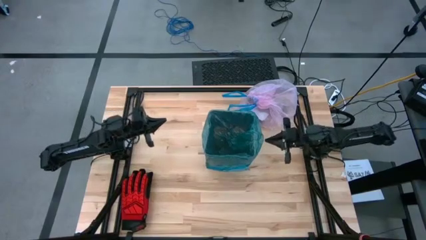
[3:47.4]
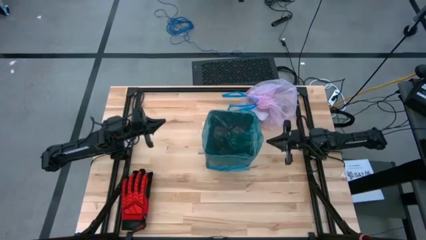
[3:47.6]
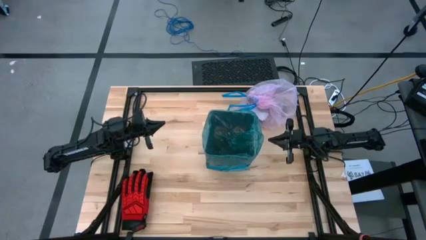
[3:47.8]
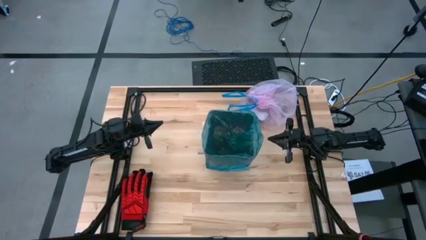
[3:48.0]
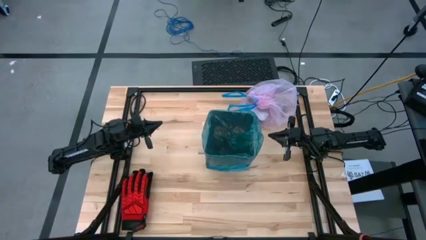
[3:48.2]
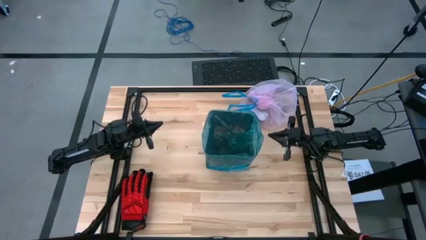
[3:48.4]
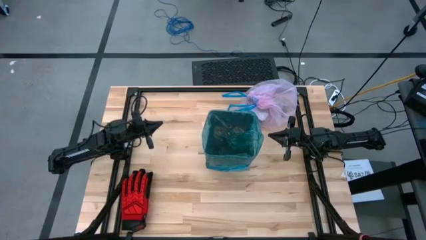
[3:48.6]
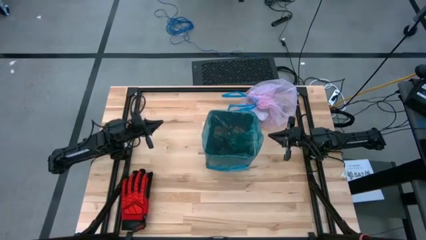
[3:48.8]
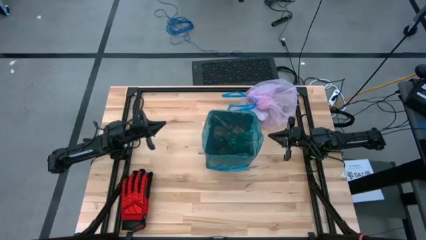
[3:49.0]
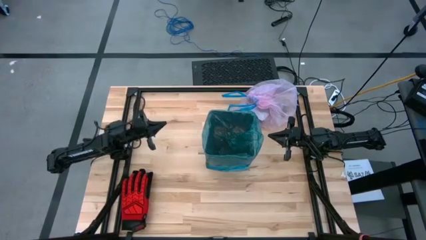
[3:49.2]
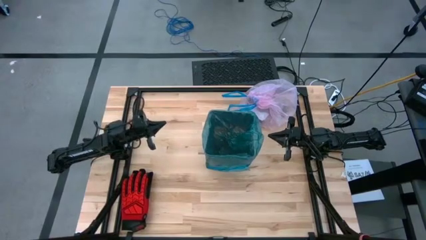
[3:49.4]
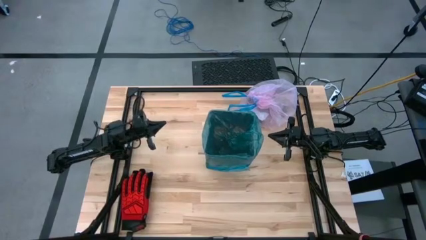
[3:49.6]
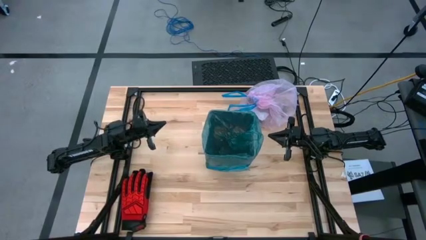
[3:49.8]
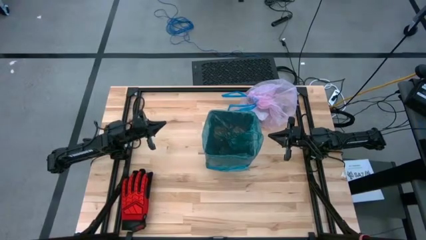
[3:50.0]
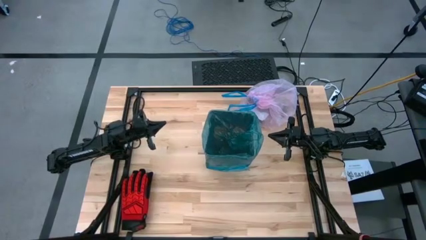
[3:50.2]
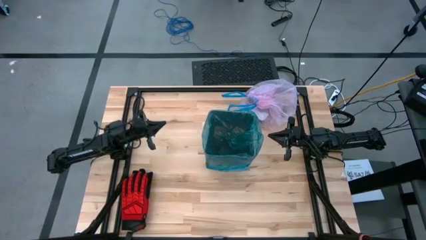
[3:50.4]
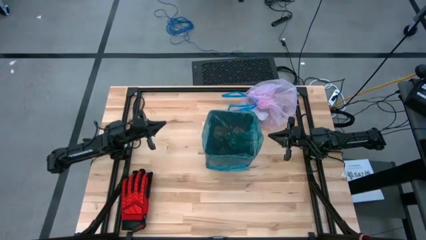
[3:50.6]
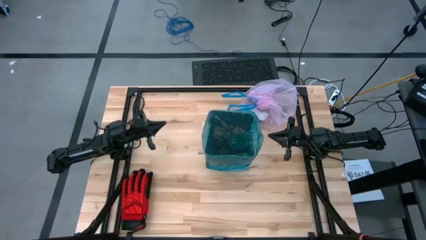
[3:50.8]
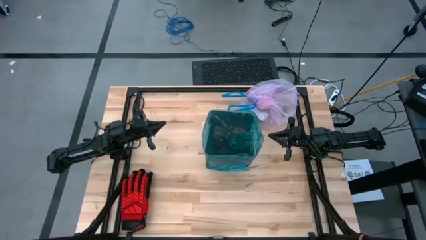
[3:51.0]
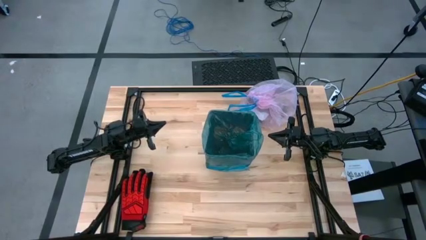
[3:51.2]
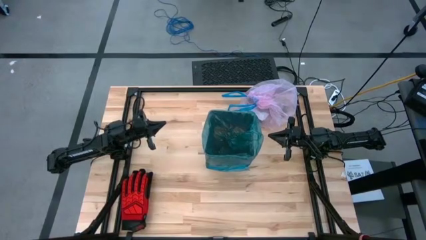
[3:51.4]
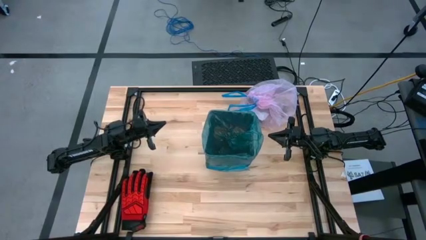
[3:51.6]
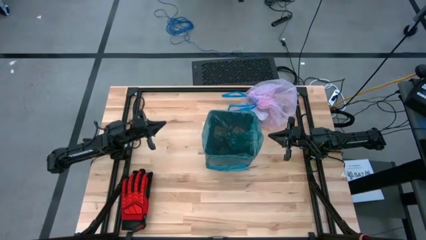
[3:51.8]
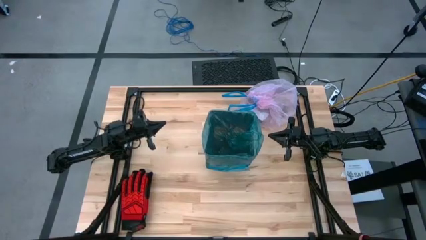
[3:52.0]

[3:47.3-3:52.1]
Task: place trash/remove bag and relplace
Return to Home Position

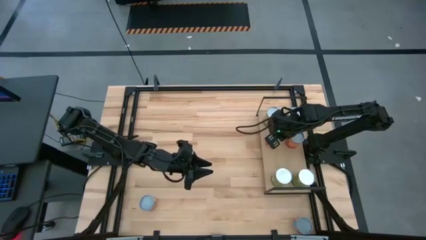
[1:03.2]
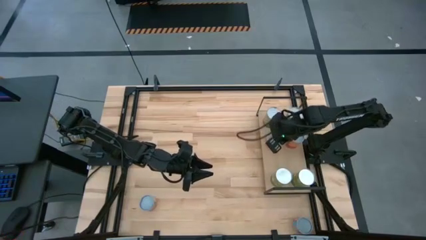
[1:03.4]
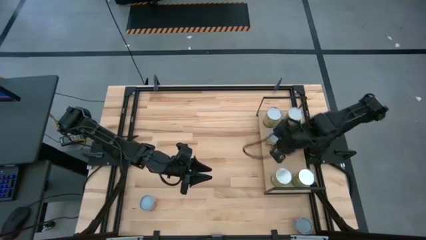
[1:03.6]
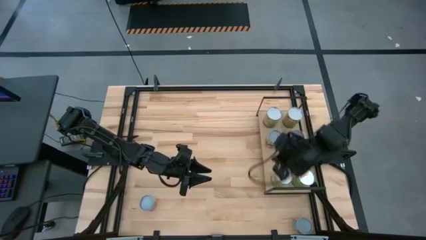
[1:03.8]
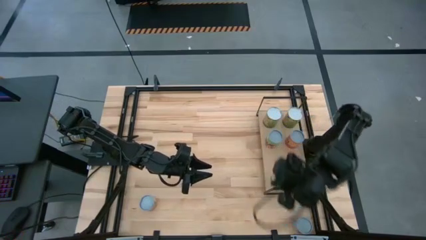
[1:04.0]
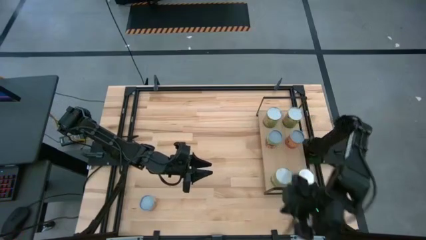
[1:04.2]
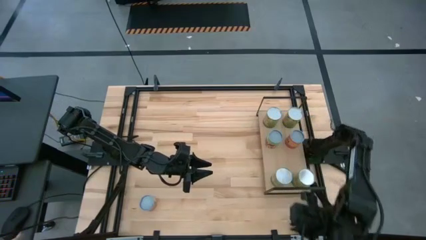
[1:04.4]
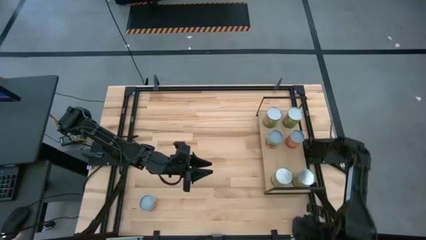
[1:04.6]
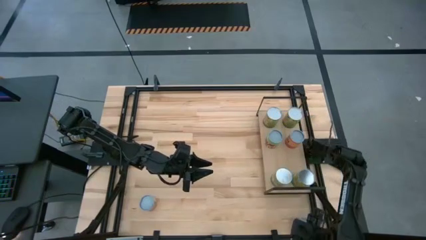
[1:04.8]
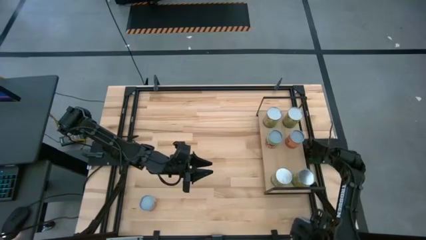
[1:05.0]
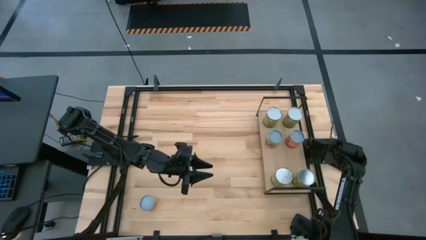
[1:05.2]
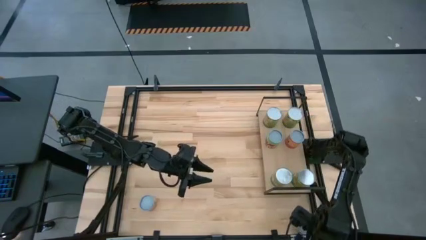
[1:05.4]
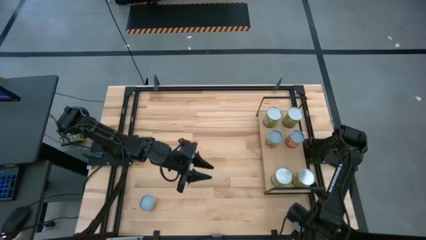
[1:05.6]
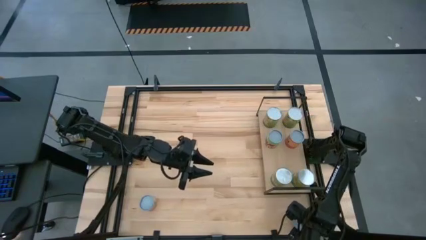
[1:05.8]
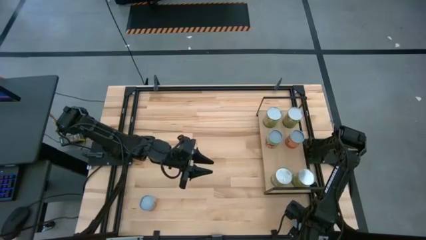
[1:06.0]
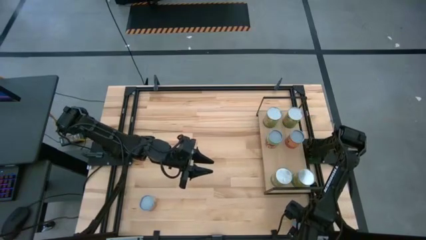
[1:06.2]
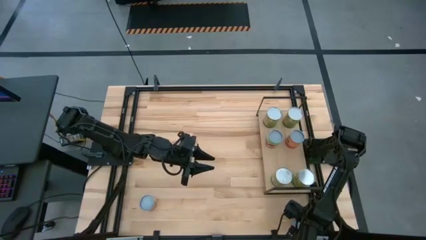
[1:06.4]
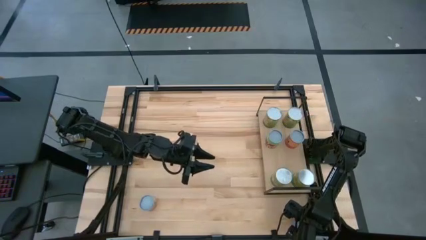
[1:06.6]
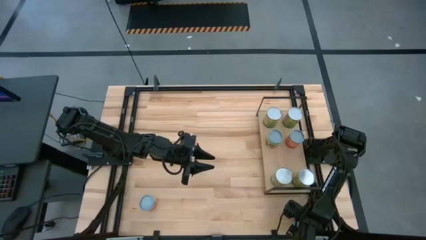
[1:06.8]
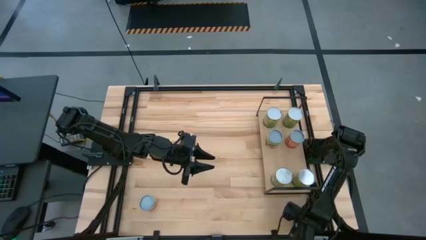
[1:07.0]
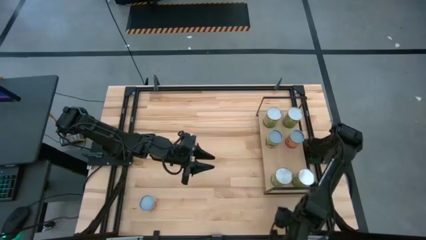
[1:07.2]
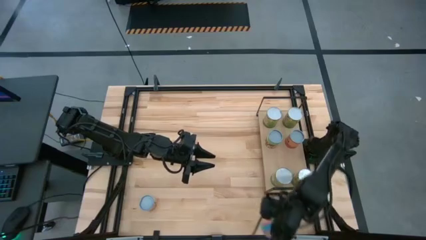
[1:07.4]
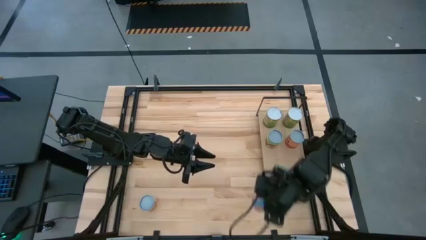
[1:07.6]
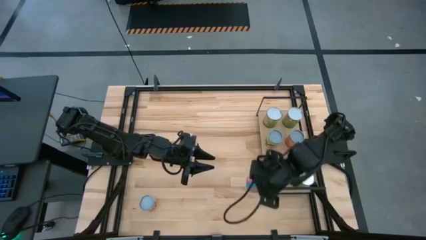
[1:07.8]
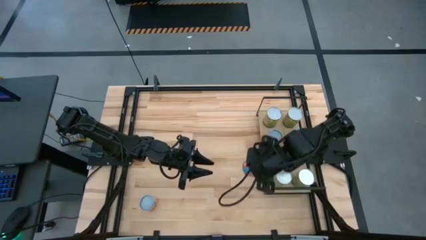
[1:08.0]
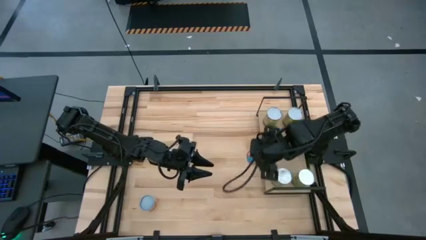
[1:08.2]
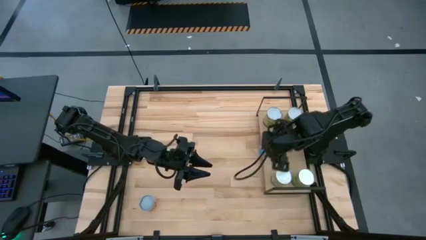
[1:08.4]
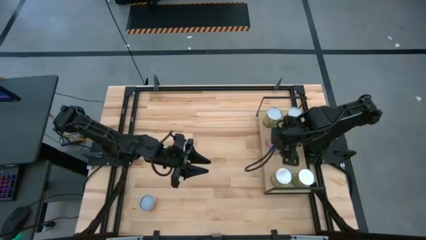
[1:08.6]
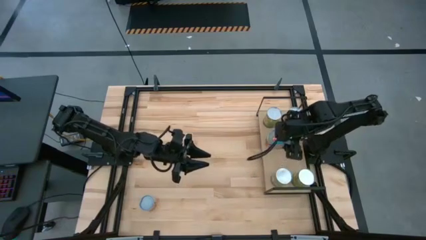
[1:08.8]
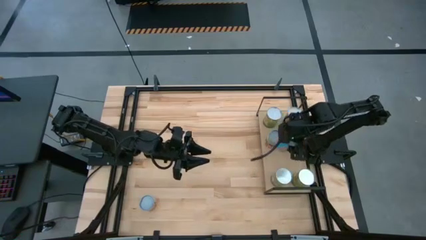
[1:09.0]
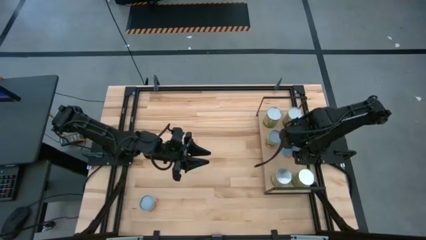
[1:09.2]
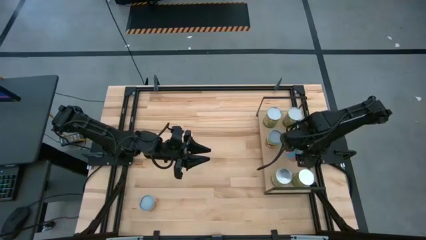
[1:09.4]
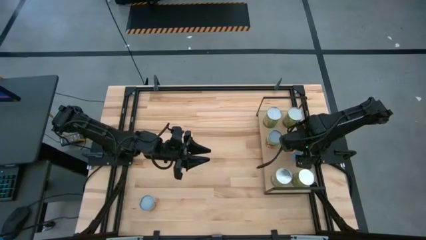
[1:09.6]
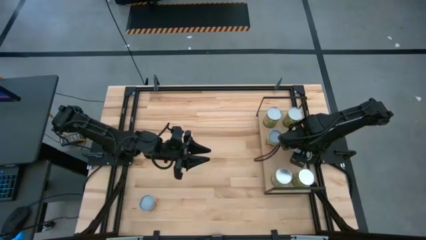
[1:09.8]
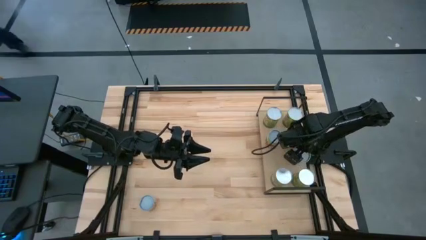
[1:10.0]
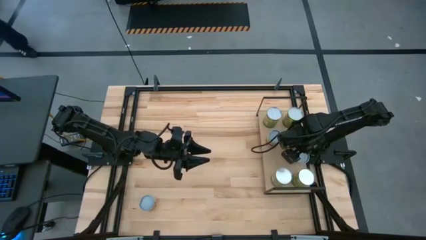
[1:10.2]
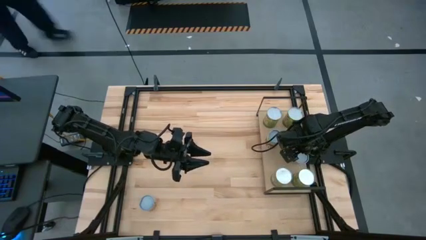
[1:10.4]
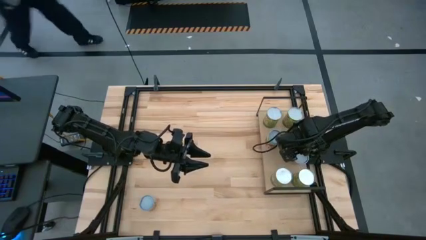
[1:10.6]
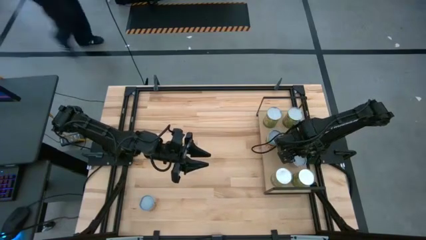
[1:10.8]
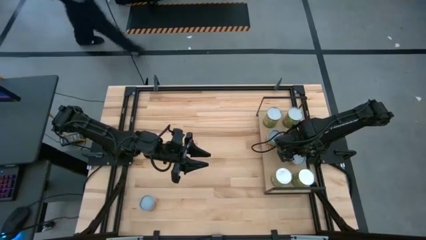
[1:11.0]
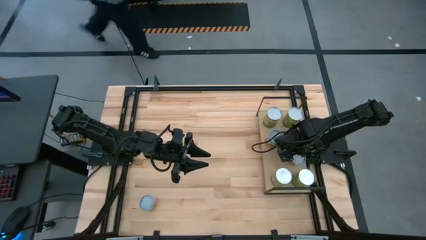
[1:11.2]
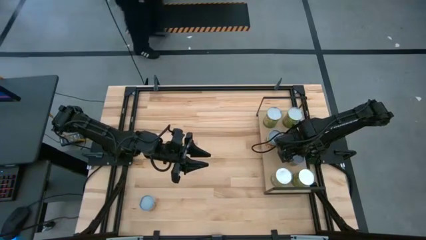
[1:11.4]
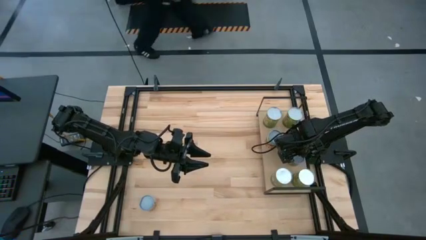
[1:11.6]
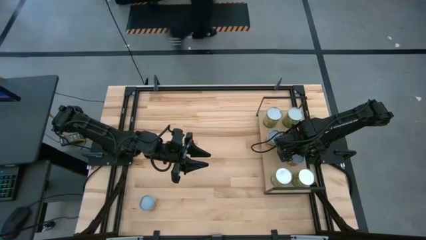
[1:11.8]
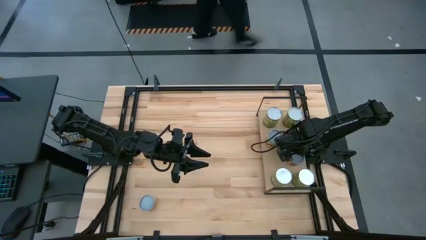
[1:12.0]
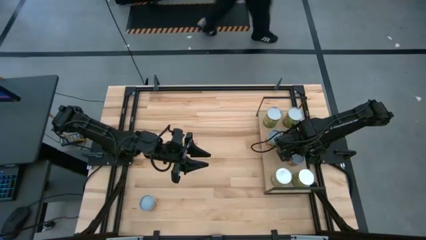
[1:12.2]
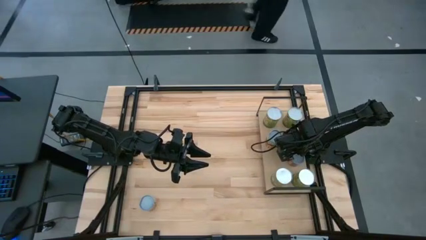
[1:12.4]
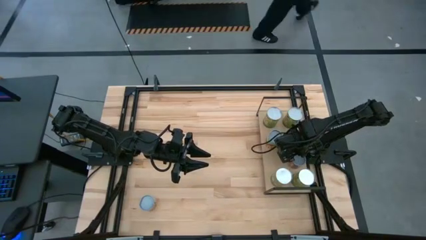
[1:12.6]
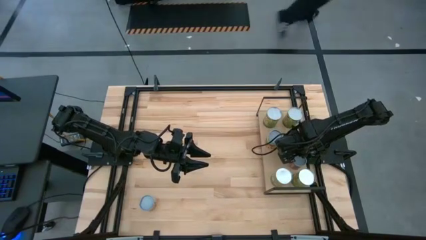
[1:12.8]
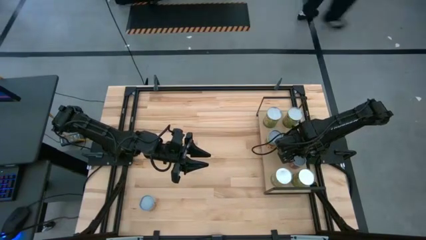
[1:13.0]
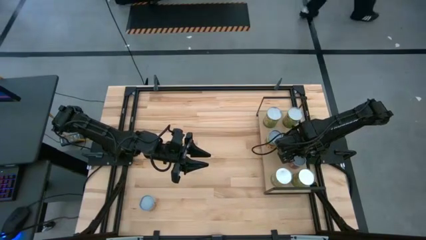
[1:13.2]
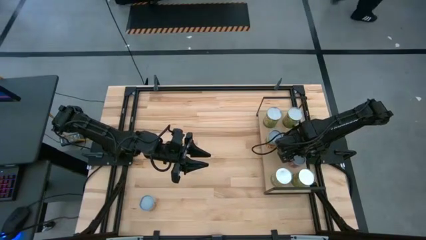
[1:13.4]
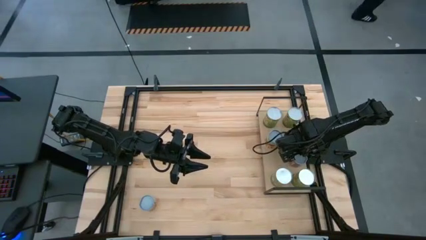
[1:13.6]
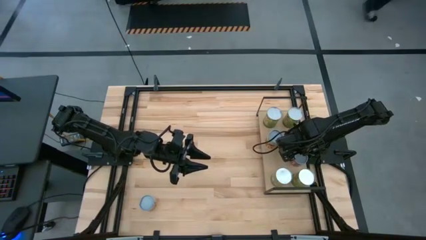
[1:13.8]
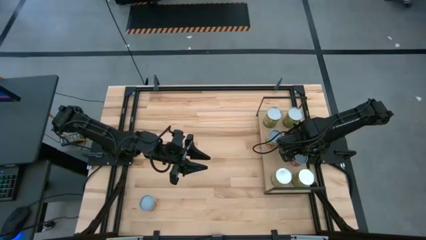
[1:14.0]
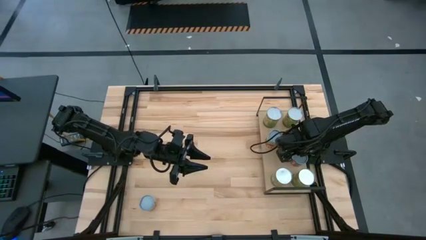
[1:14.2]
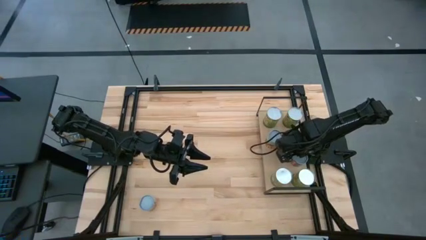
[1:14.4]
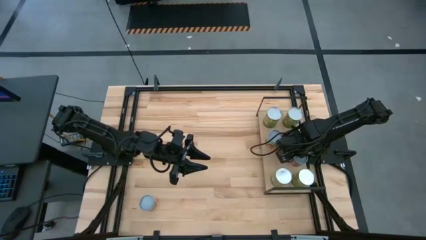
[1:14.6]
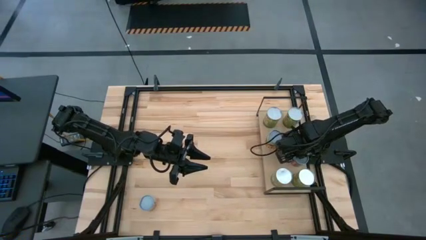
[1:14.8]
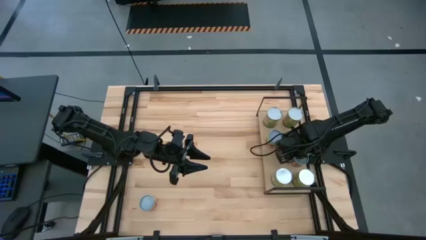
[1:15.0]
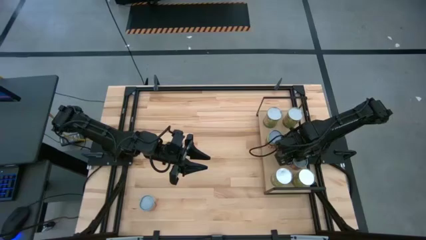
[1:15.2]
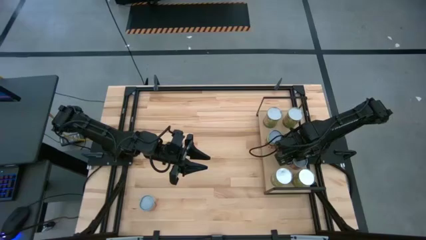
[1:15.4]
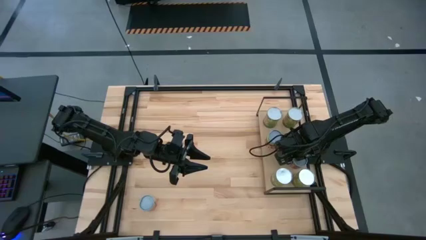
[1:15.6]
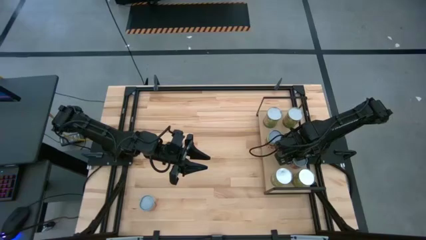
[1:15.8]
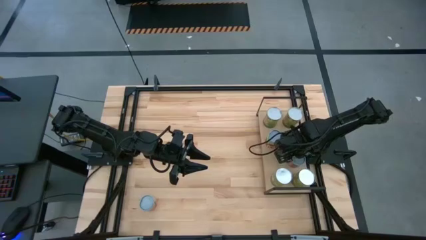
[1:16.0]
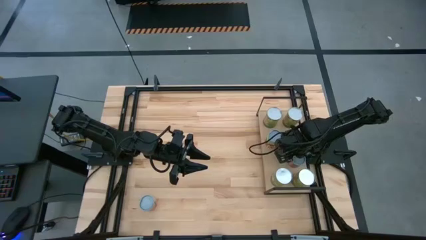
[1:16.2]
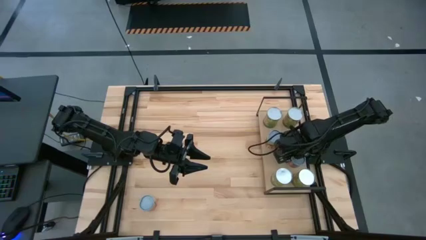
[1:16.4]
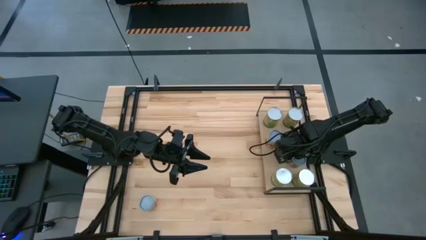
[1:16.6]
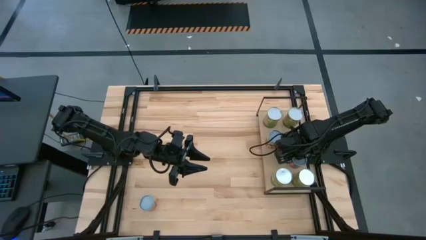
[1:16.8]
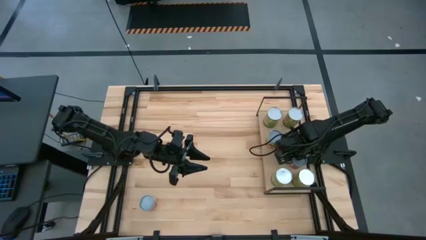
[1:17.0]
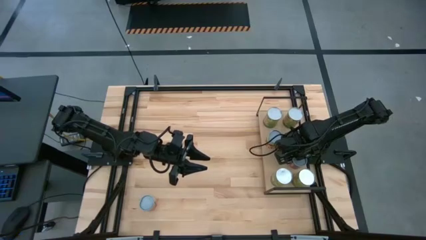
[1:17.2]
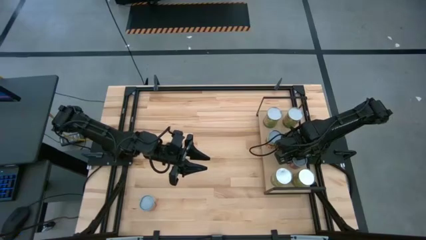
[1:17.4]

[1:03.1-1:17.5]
Task: Pick and place cans onto a shelf
Put the canned corn on the shelf
